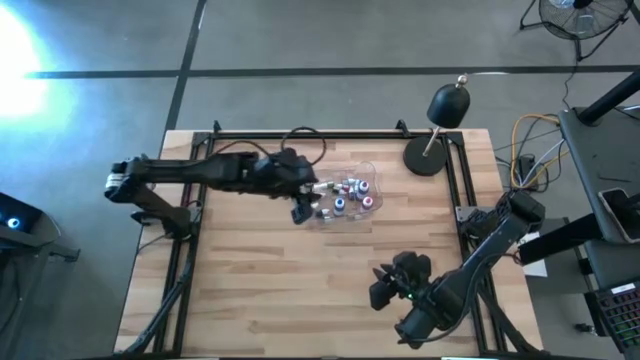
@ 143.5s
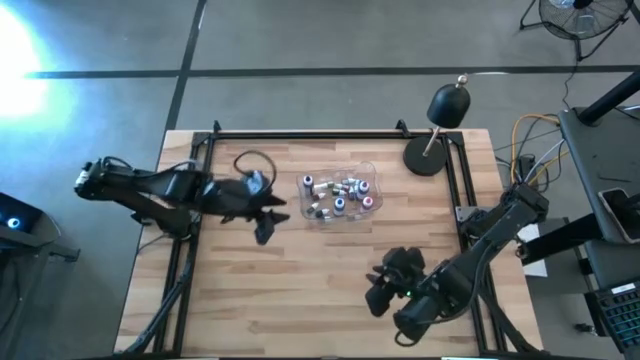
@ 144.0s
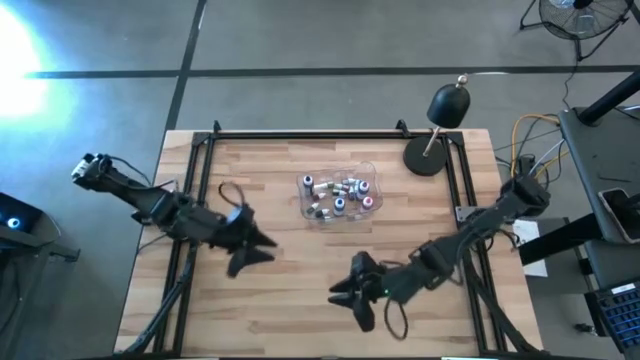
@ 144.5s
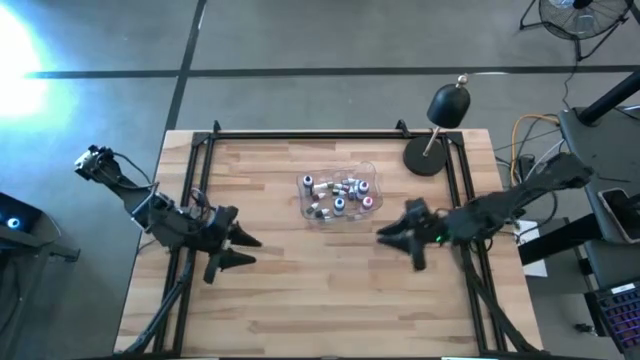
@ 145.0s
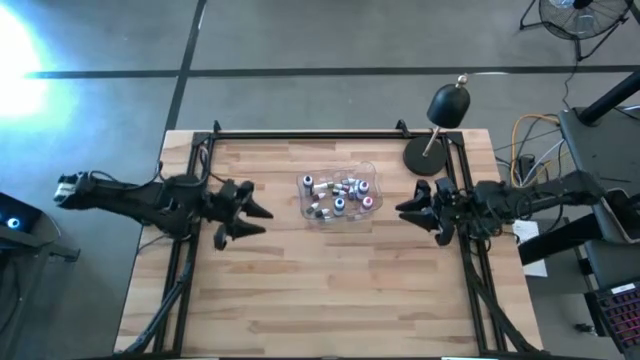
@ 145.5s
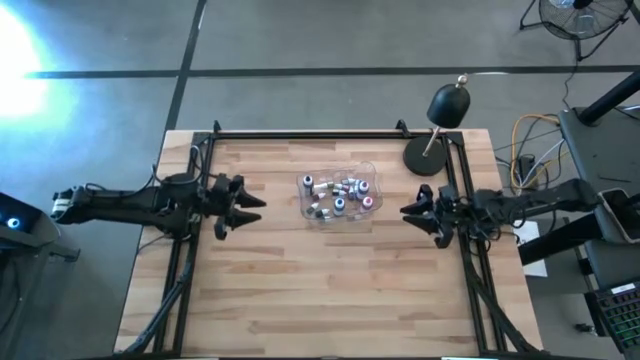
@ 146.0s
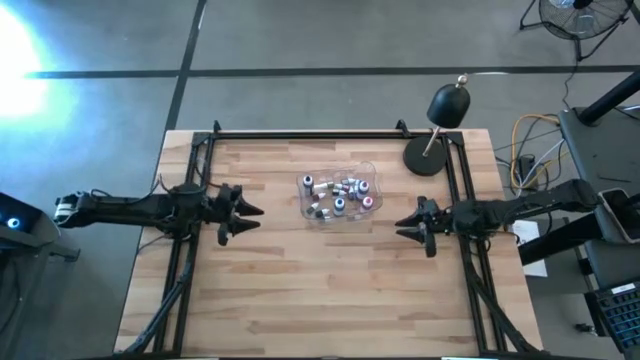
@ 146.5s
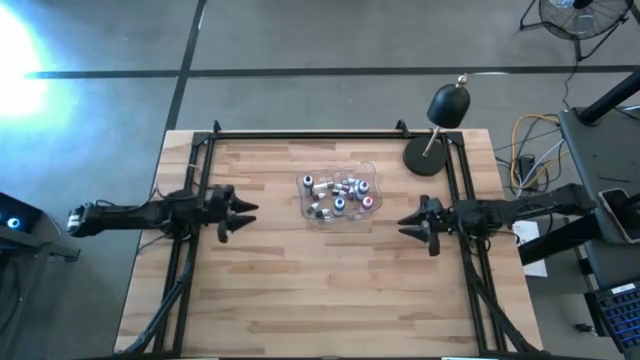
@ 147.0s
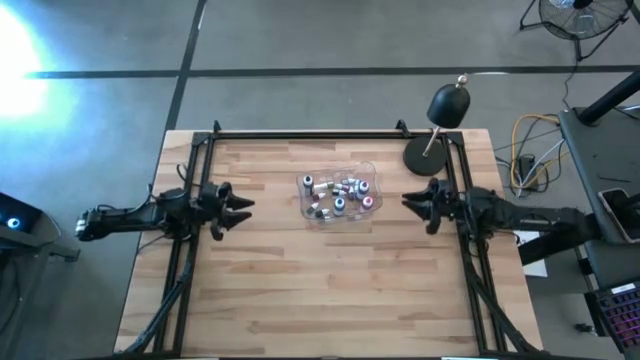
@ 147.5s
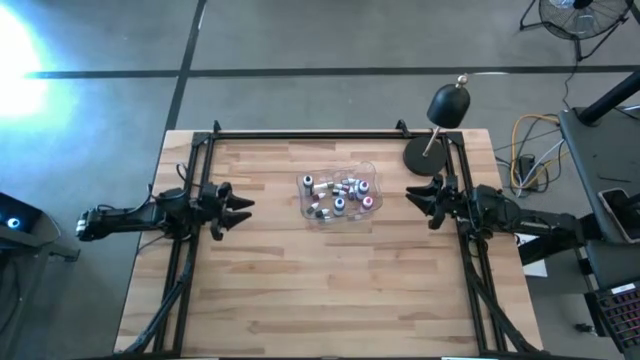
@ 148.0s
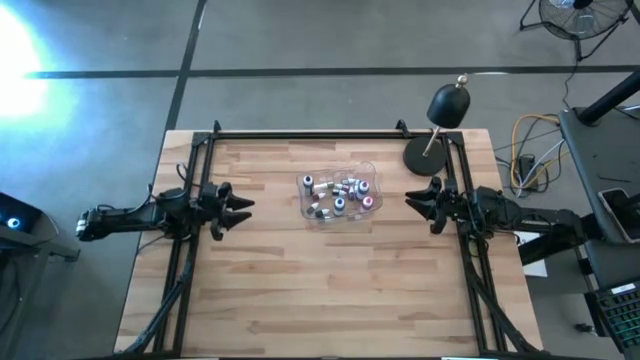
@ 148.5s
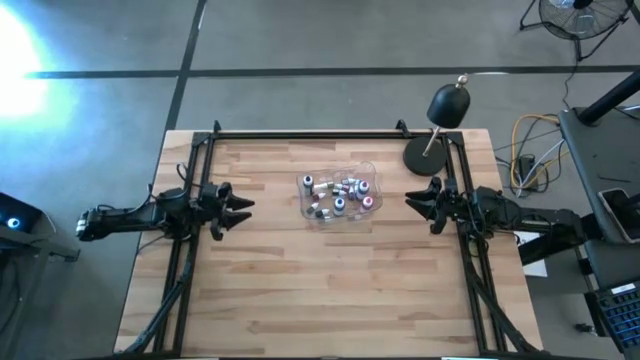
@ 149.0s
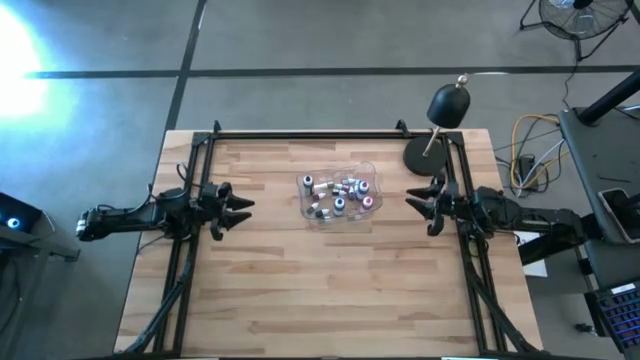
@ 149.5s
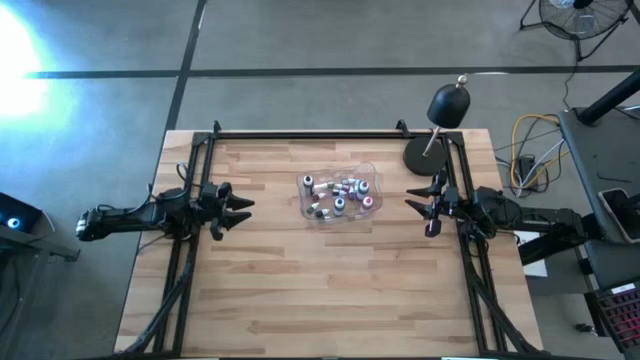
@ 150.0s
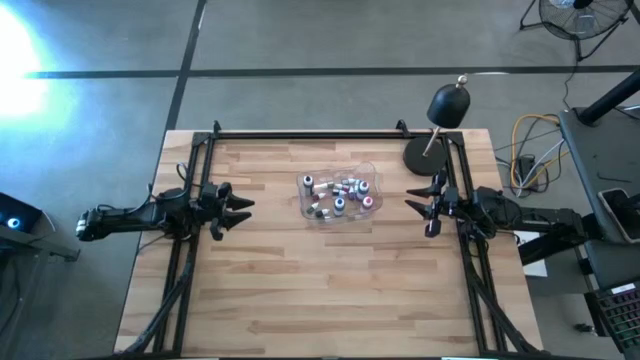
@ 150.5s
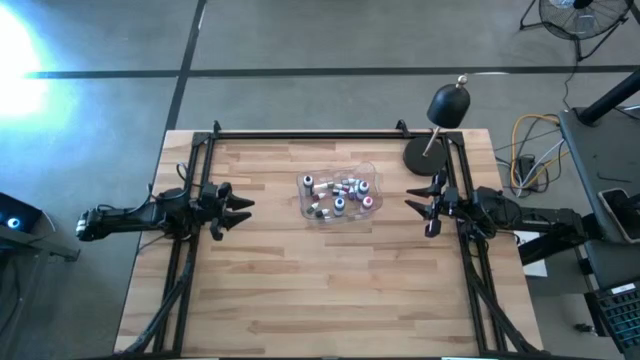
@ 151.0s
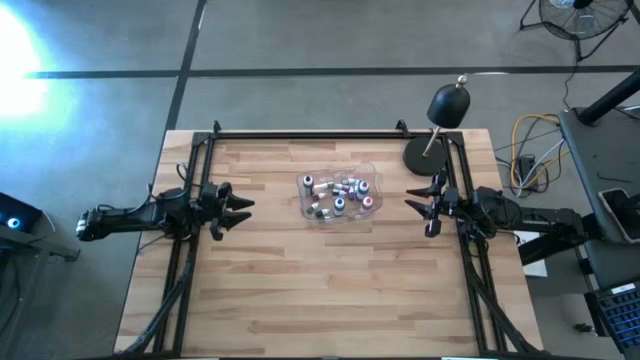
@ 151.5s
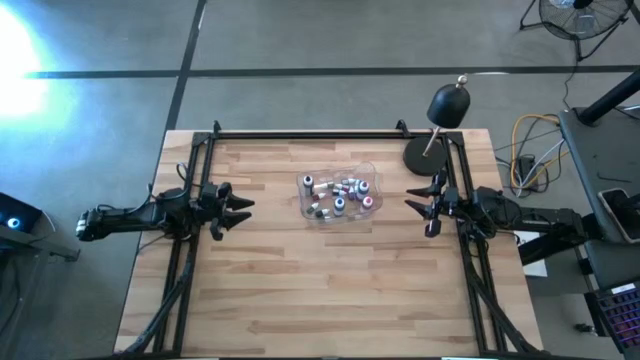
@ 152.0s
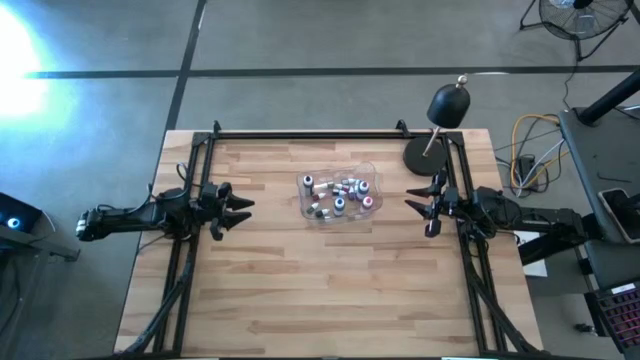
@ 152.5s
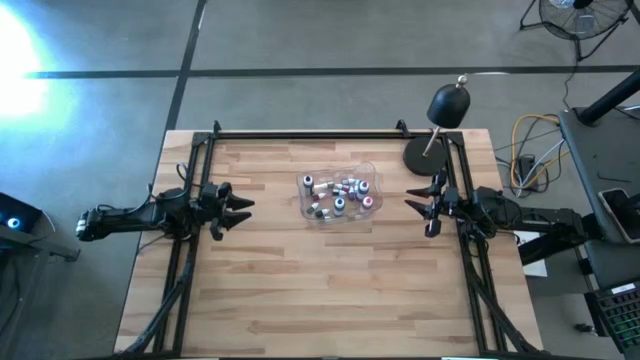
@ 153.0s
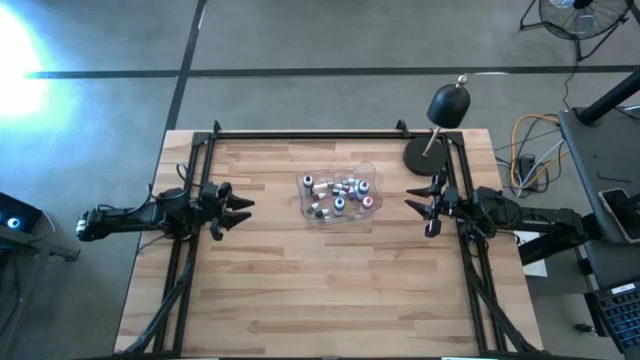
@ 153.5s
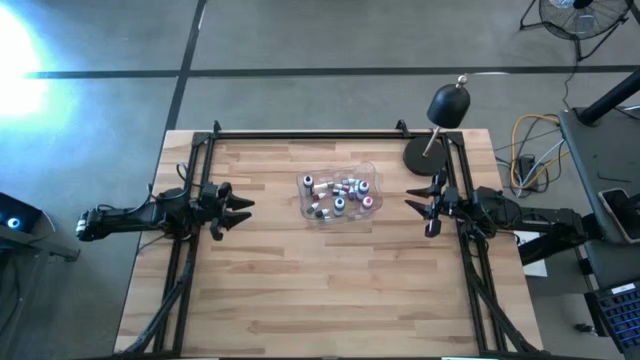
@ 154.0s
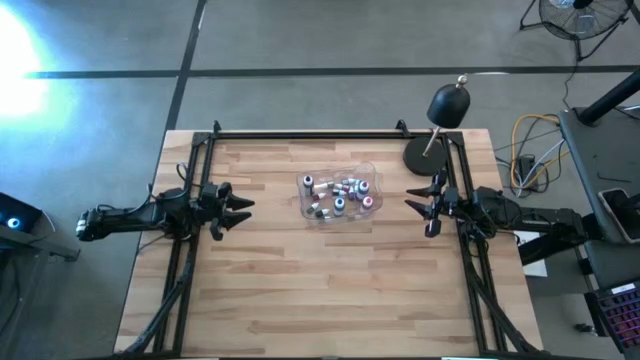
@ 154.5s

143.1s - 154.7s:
Task: Pick & Place food coloring
Return to Home Position

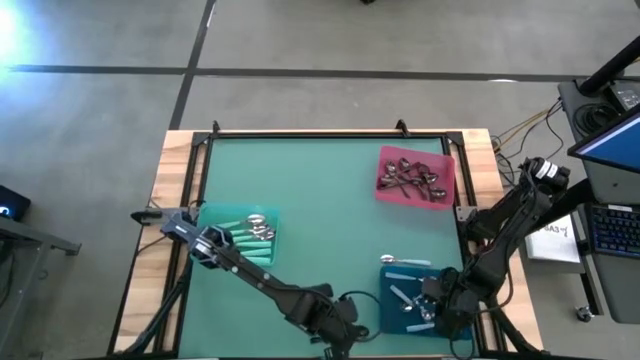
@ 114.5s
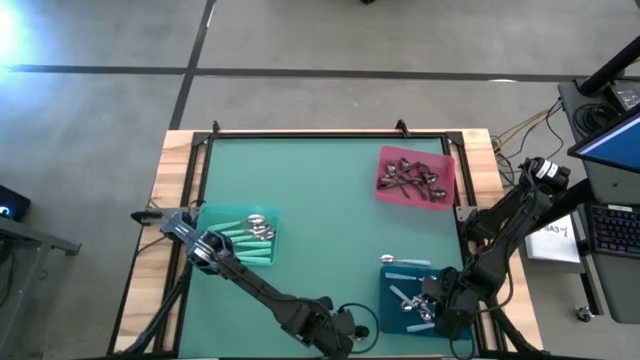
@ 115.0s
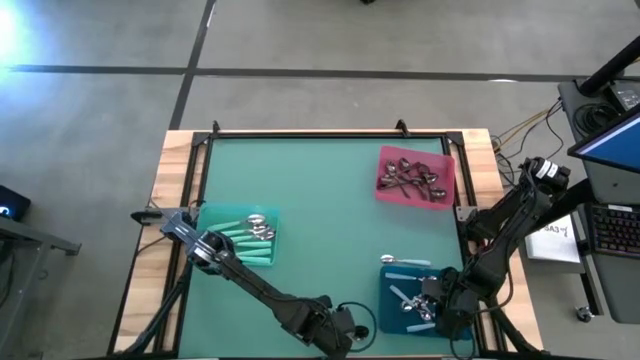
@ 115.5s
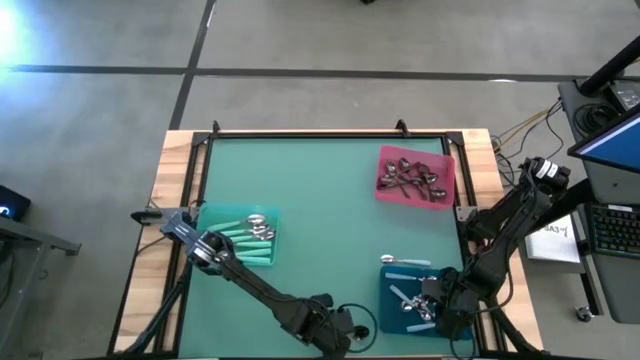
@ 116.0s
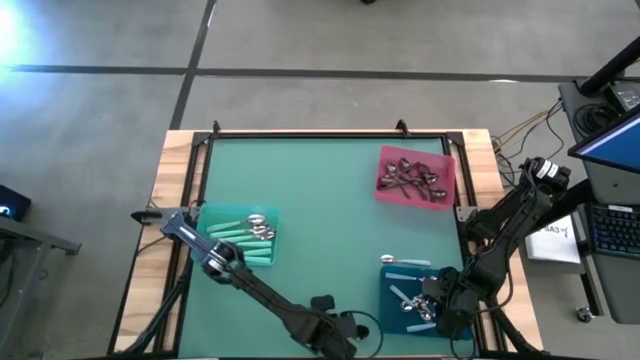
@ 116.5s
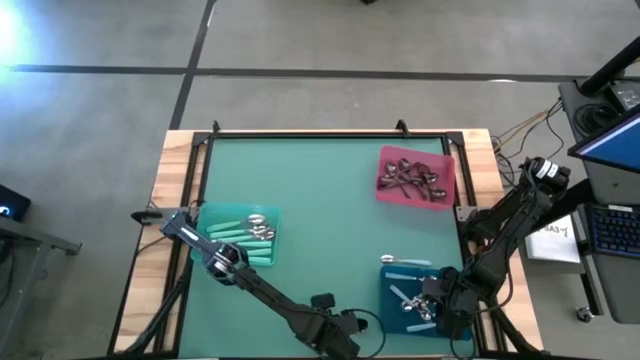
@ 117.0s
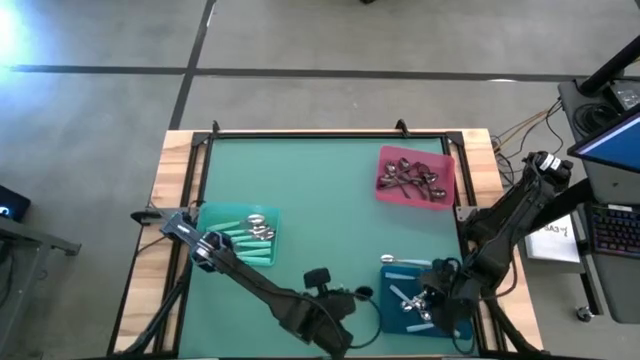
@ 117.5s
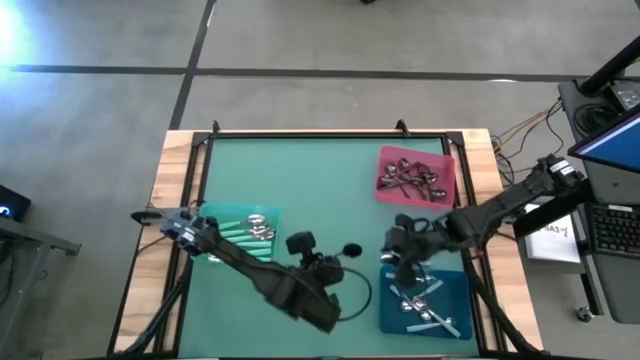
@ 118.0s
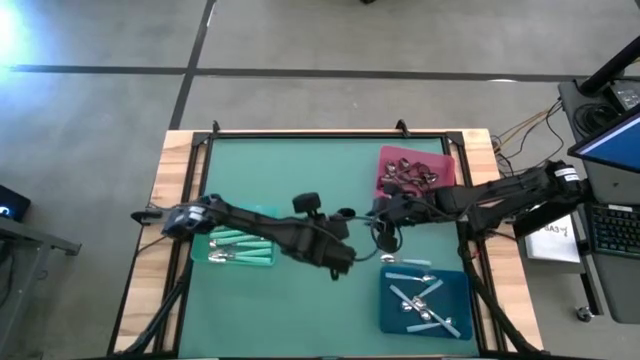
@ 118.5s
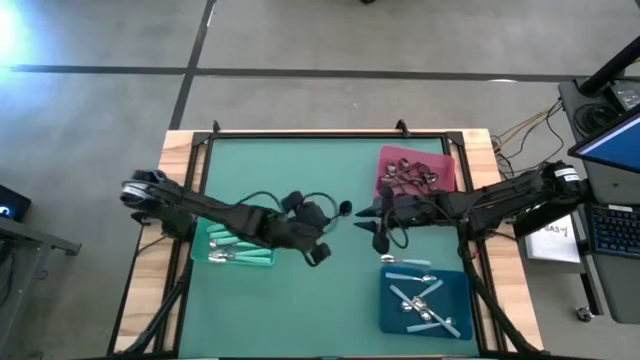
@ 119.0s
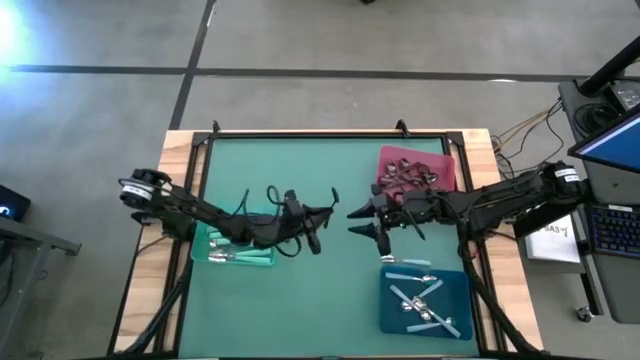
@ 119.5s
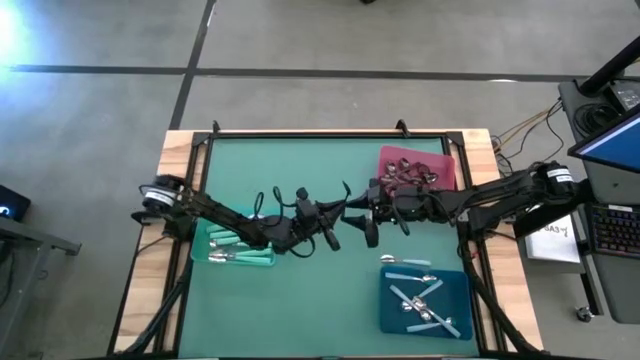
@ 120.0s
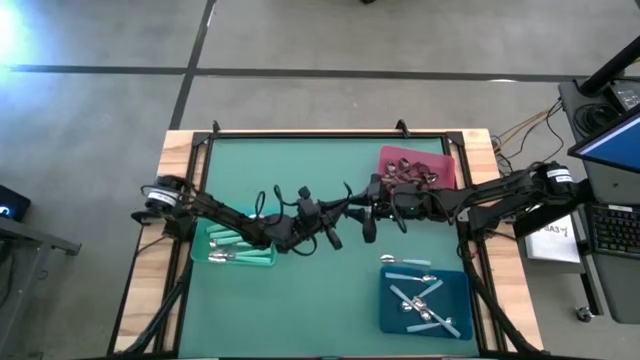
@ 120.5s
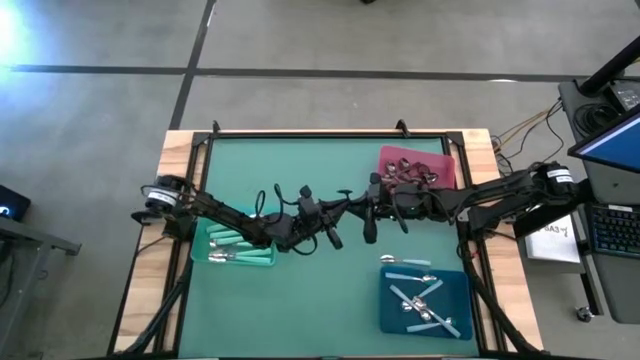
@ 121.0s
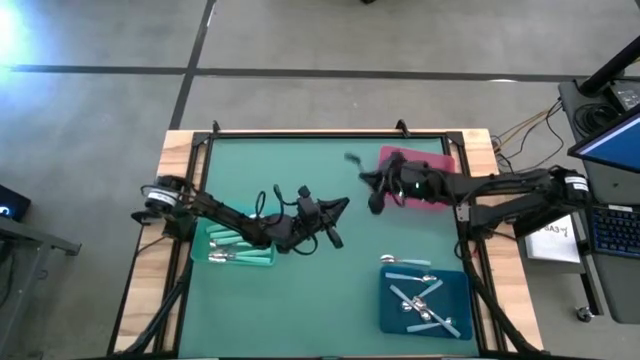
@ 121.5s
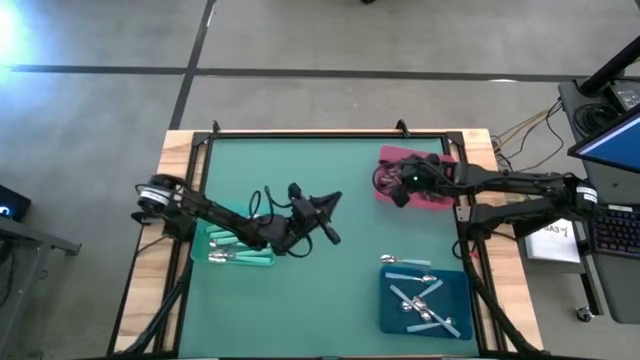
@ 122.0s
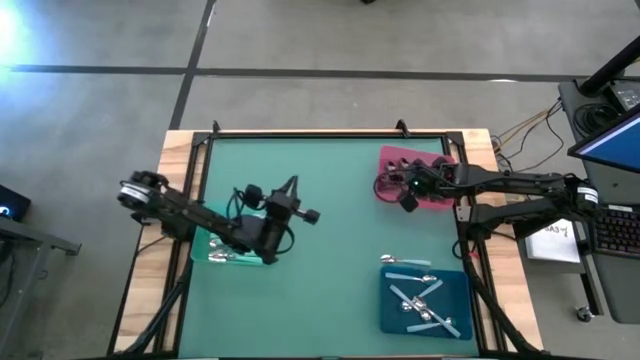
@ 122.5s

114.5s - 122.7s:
Task: Sort silverware by color (type)
Put the black spoon into the red bin

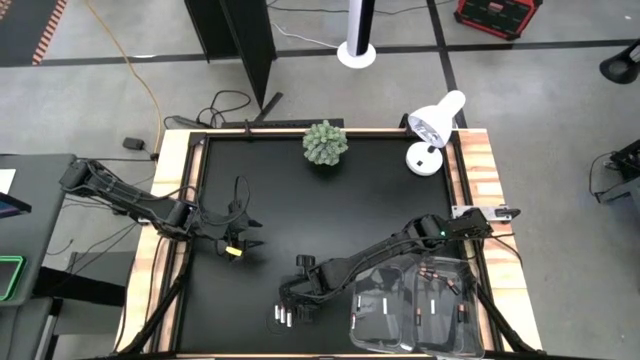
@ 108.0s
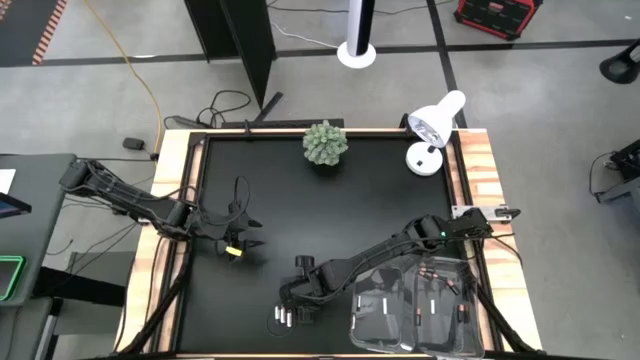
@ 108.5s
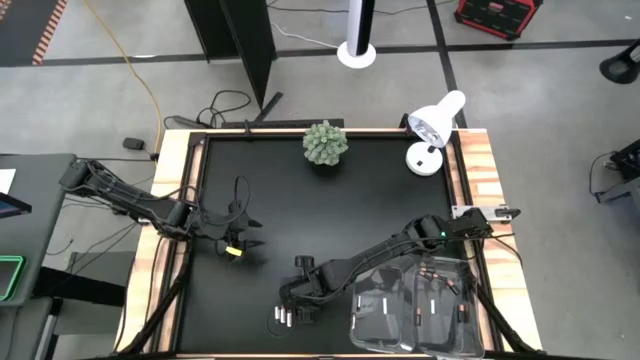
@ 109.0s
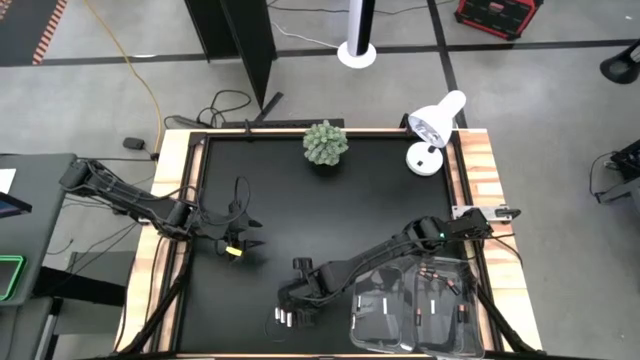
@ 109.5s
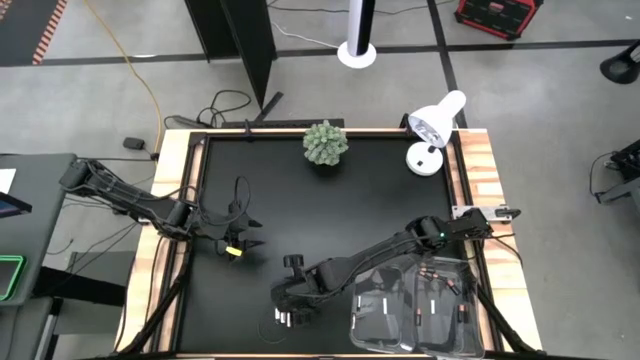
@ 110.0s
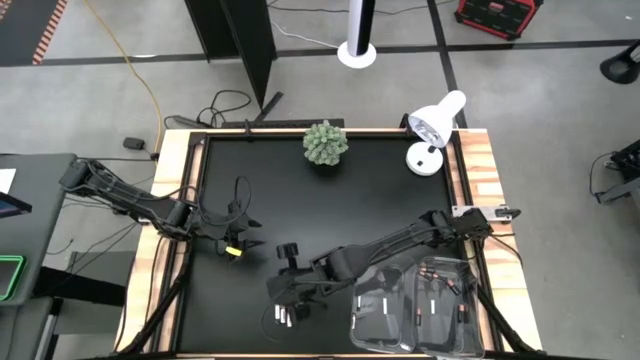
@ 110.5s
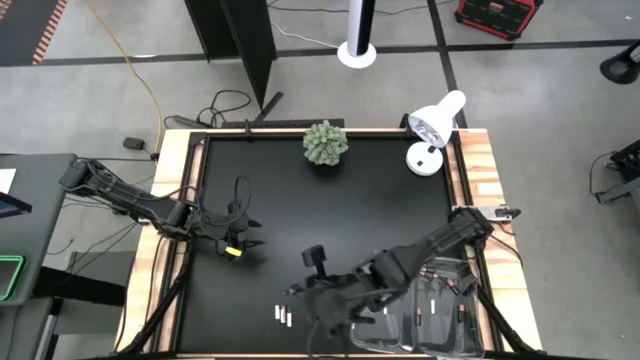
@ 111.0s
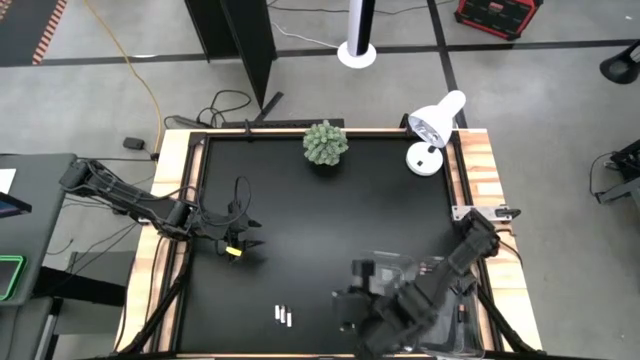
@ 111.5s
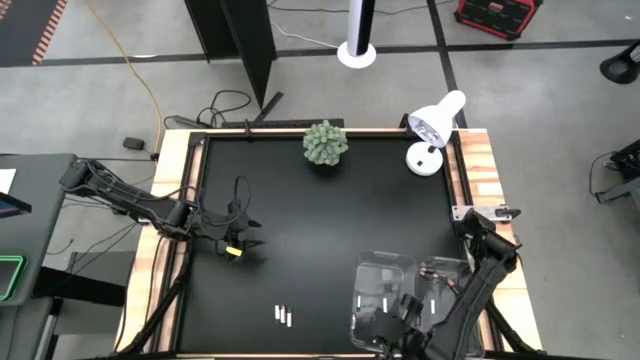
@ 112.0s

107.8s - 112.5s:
Task: Sort batteries
Put the silver battery into the left transparent bin
